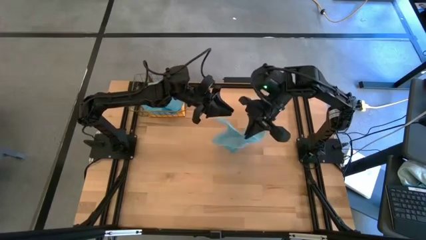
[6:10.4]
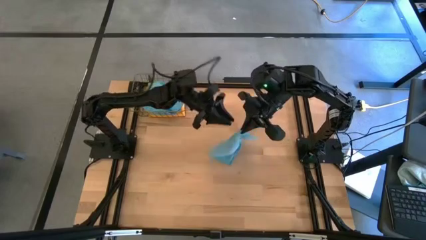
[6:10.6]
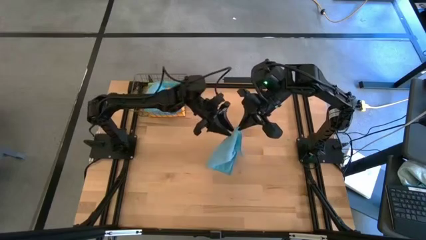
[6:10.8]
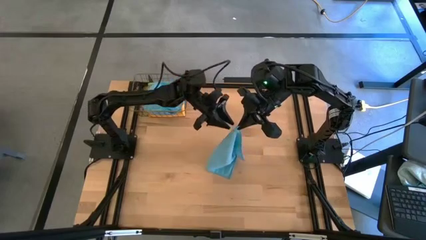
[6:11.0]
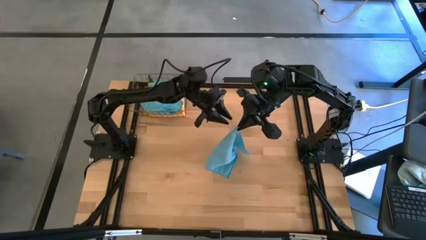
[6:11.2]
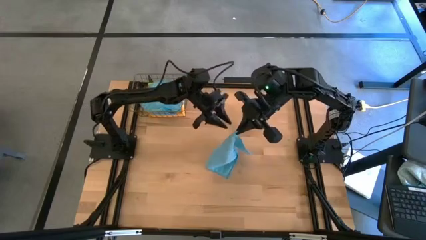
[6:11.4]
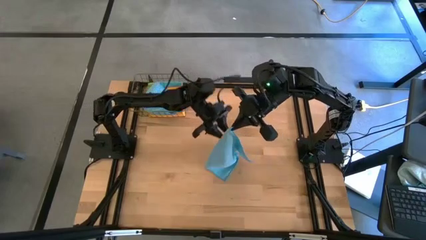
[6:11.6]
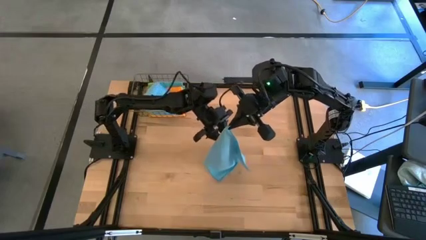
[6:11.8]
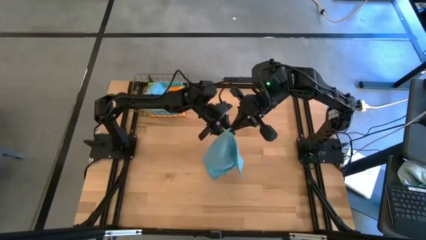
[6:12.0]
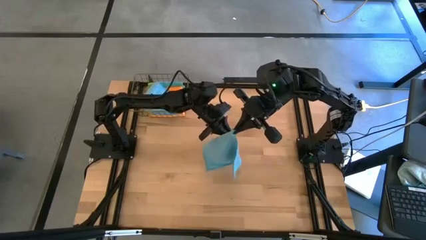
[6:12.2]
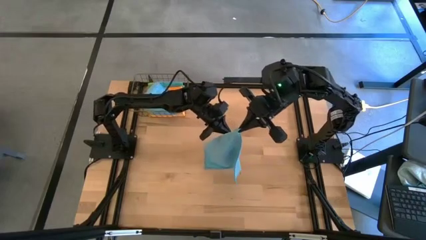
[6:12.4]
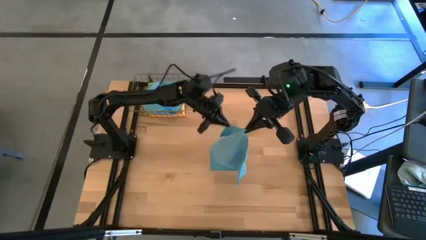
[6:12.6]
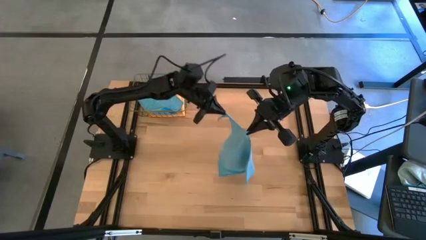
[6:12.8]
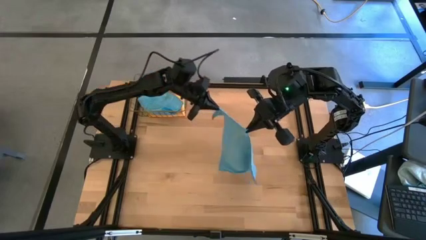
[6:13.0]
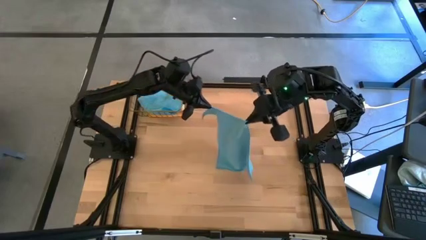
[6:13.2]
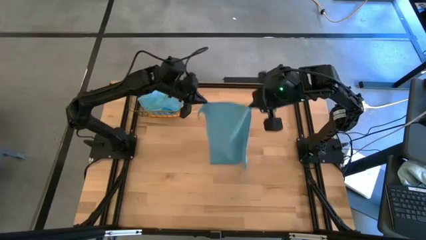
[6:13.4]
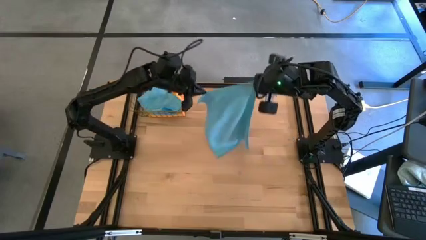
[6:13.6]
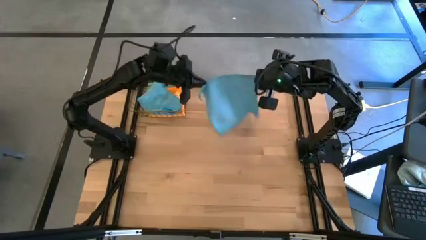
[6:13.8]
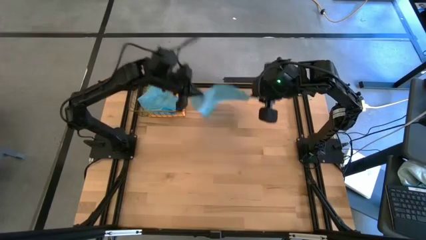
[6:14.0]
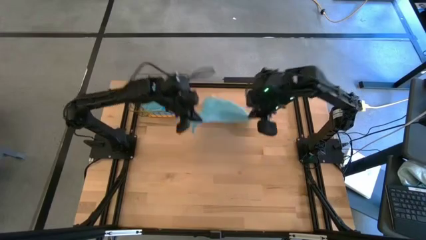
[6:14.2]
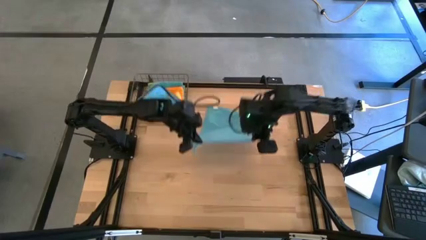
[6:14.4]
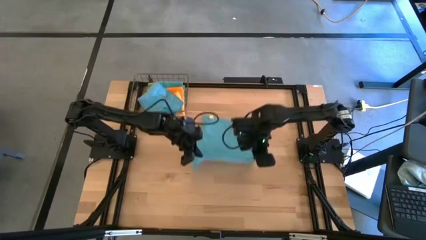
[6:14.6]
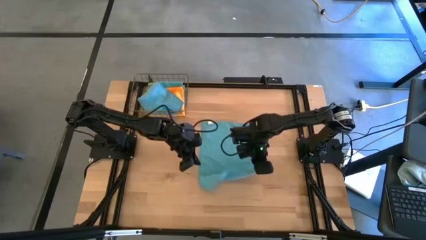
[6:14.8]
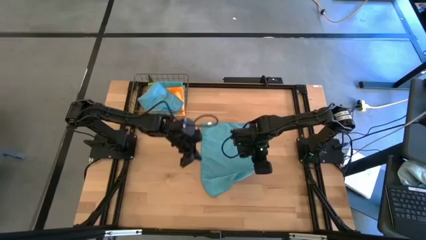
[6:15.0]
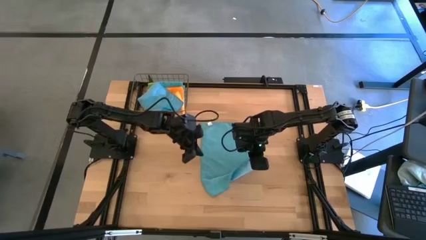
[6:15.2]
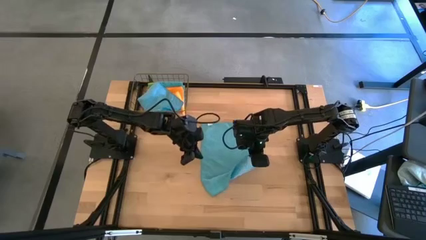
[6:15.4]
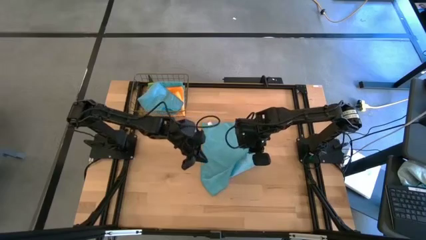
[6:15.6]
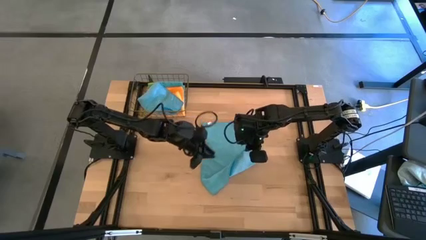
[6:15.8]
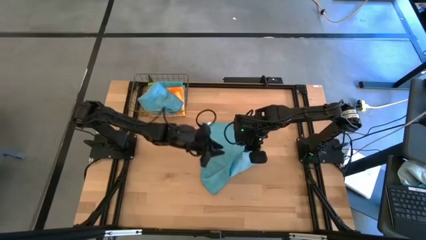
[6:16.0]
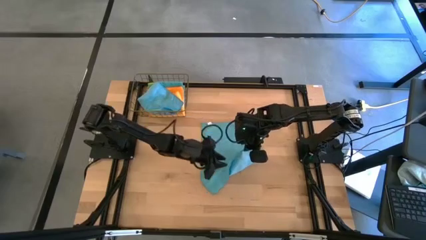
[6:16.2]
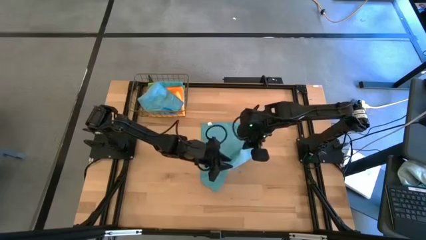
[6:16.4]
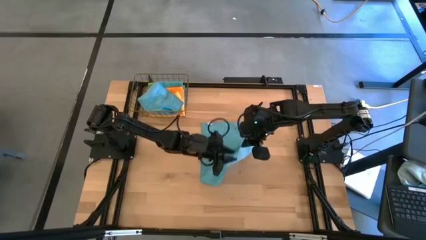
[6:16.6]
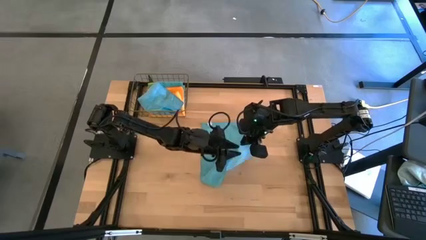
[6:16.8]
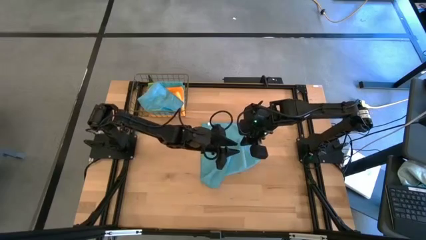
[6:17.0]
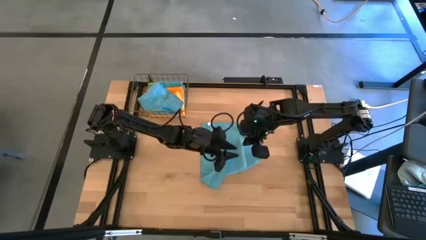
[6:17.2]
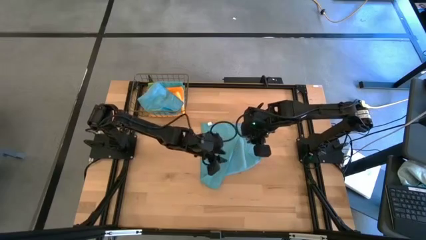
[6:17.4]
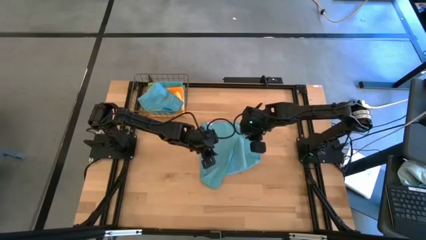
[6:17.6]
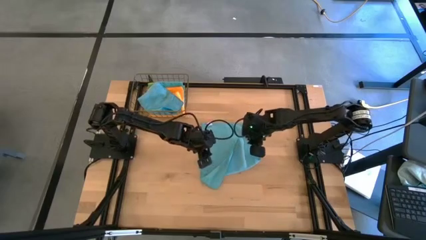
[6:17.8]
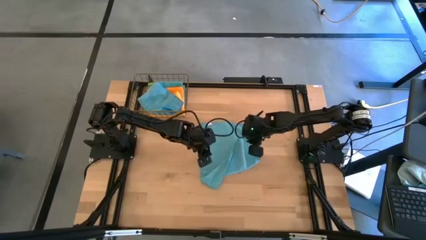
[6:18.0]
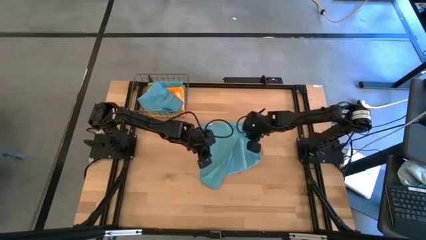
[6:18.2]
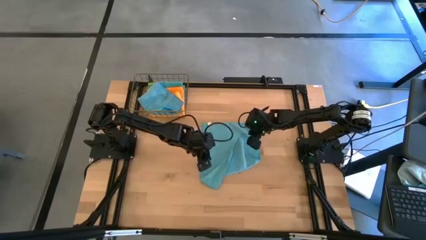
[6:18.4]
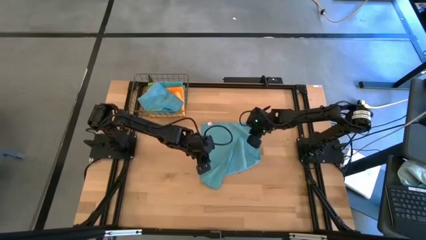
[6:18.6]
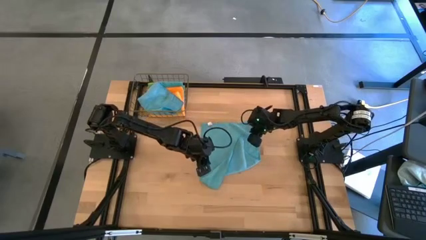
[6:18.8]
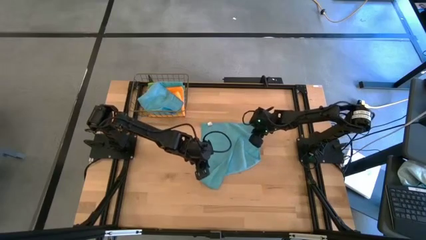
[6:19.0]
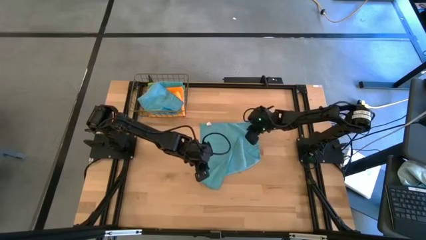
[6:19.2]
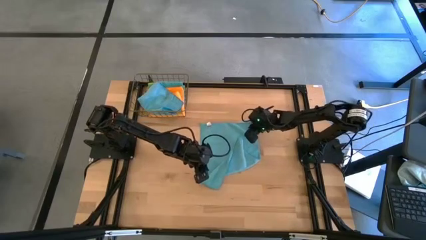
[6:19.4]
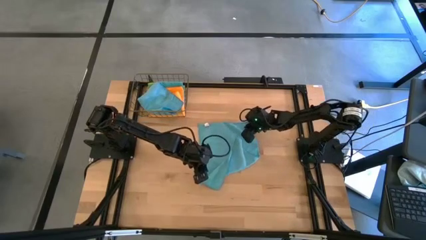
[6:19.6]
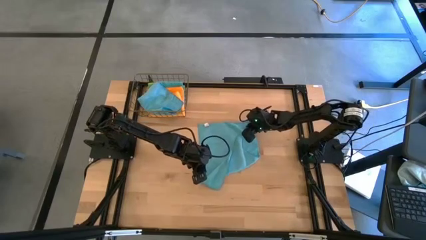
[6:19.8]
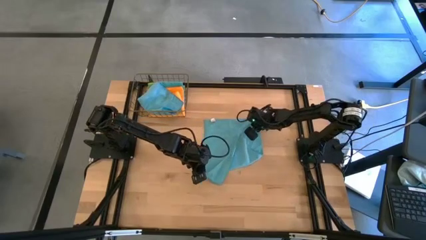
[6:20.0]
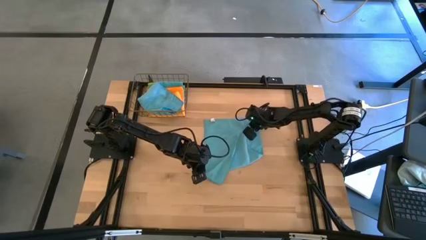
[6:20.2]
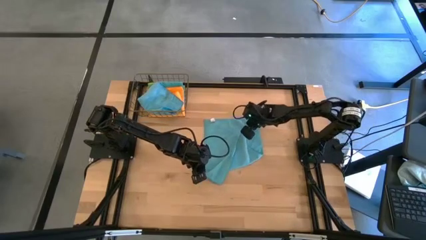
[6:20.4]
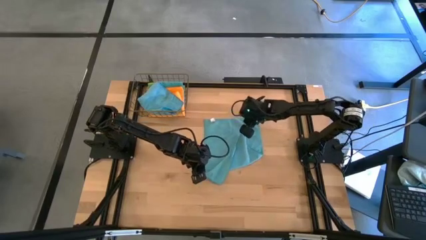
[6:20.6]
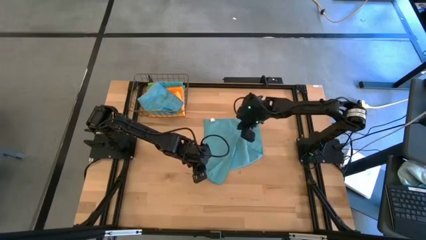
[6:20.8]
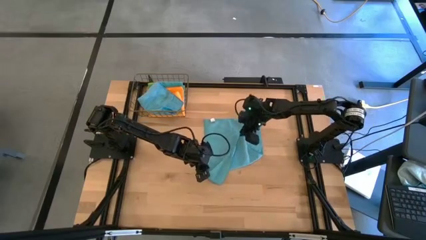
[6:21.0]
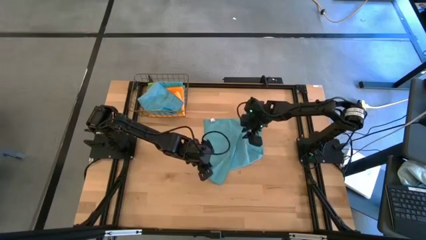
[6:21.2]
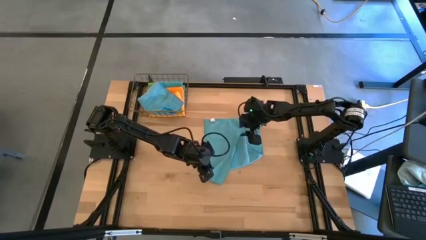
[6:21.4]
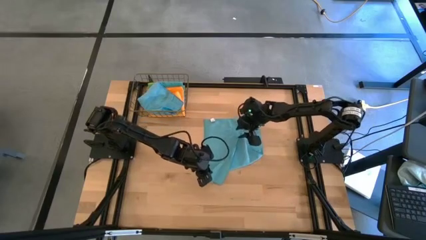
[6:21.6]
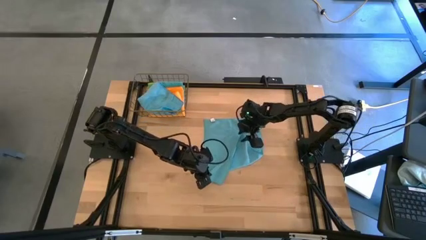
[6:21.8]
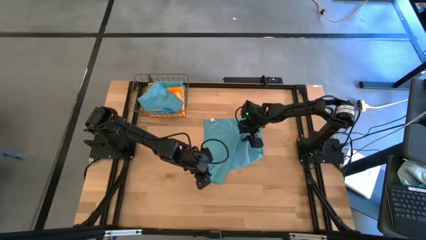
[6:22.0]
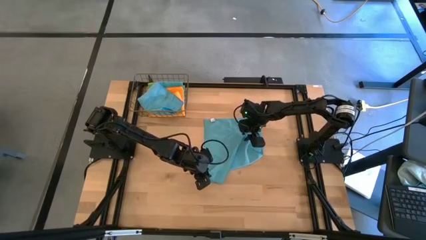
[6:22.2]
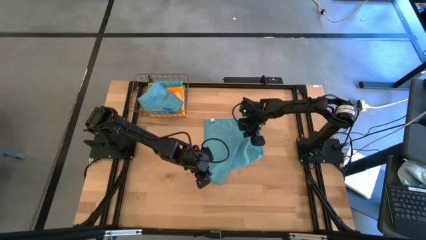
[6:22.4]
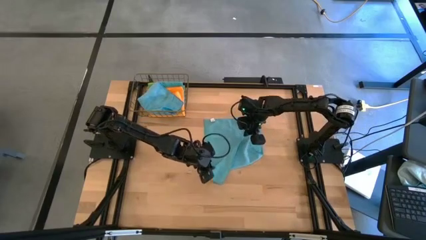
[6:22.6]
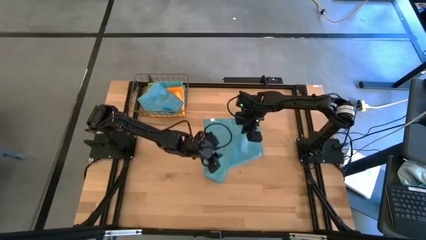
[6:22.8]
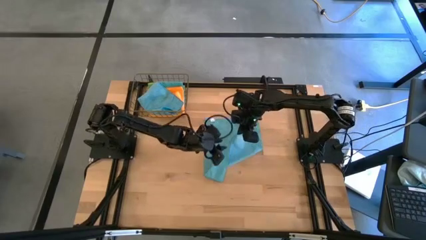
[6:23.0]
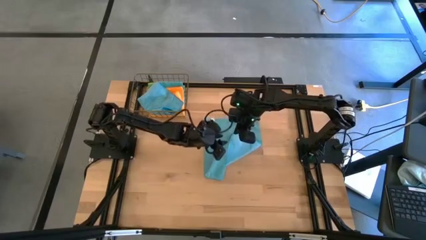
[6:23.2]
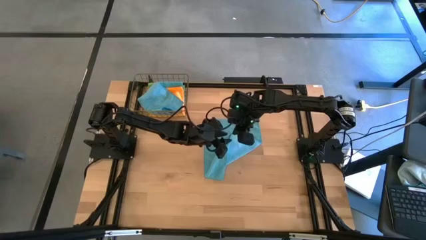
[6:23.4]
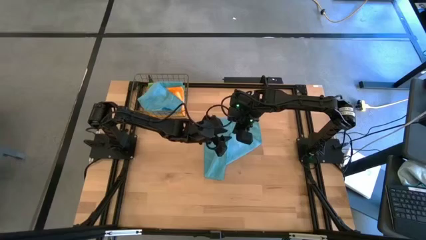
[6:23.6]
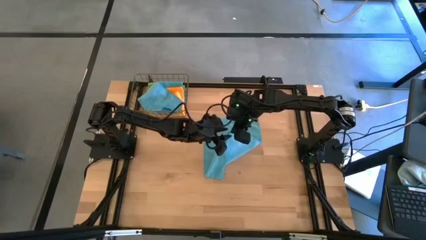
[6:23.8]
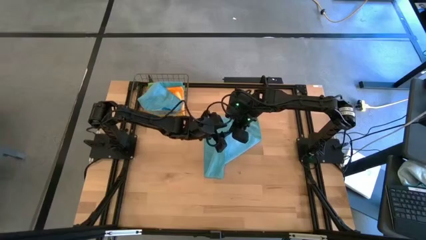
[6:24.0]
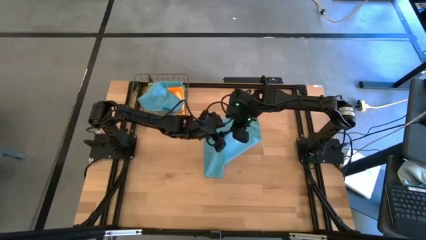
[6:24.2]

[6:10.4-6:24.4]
Task: Fold microfiber towels
Fold the light blue microfiber cloth
